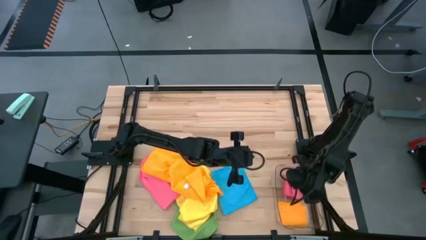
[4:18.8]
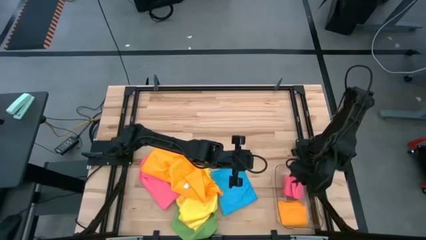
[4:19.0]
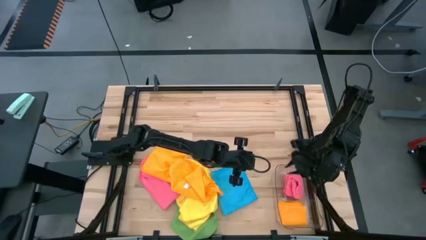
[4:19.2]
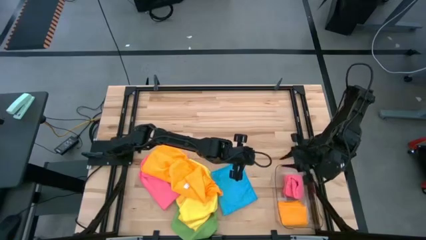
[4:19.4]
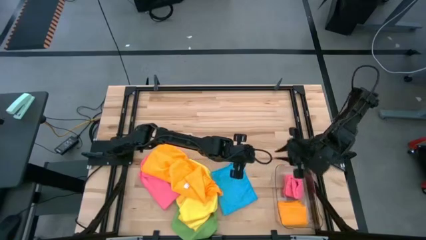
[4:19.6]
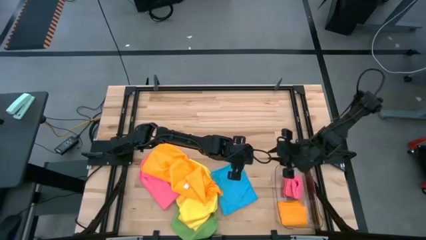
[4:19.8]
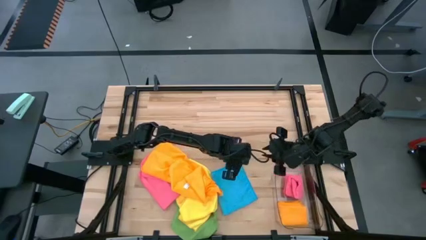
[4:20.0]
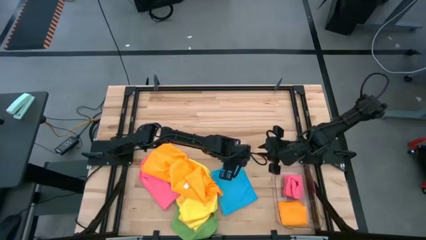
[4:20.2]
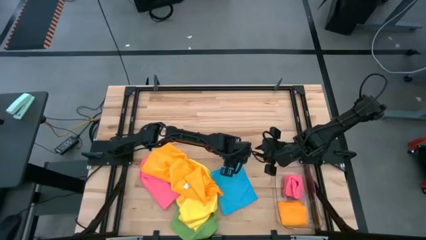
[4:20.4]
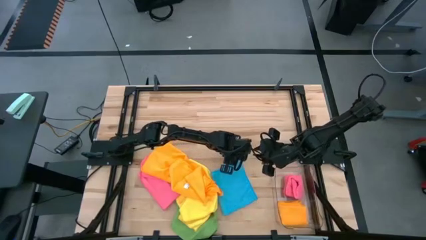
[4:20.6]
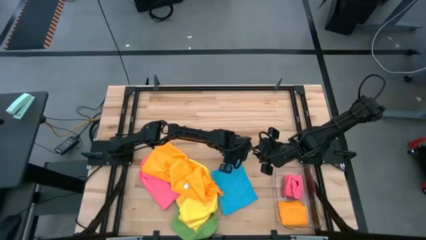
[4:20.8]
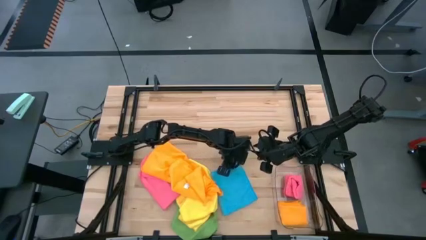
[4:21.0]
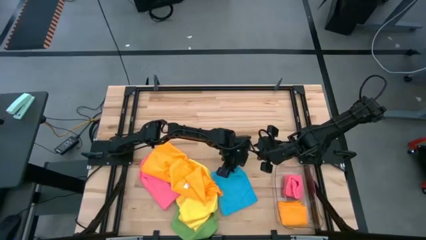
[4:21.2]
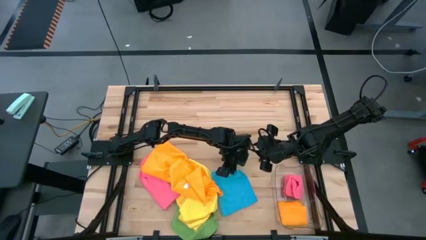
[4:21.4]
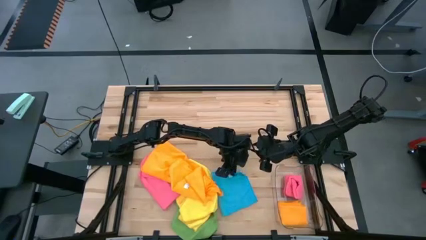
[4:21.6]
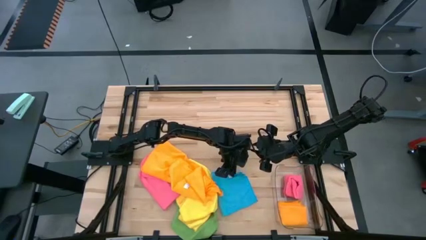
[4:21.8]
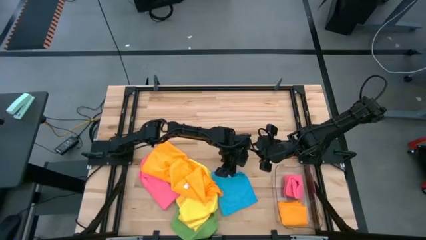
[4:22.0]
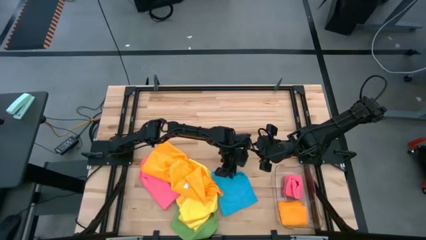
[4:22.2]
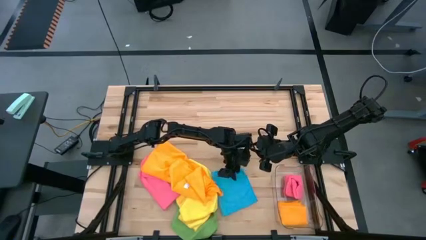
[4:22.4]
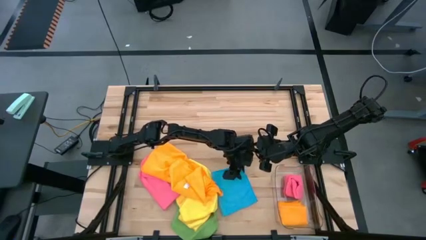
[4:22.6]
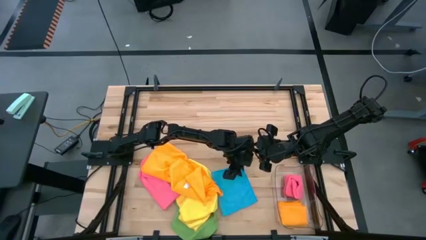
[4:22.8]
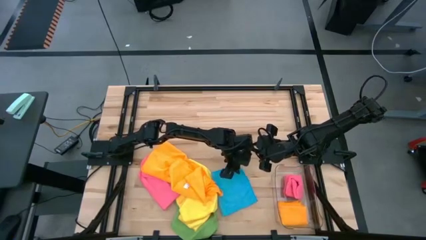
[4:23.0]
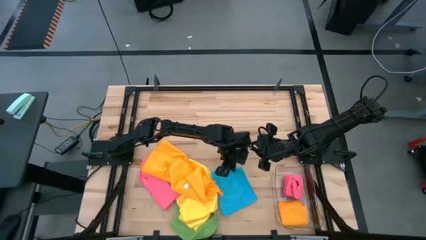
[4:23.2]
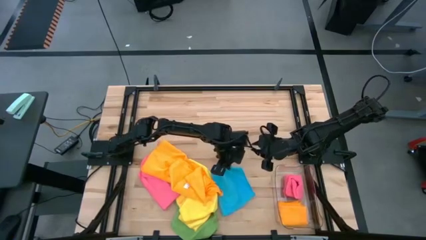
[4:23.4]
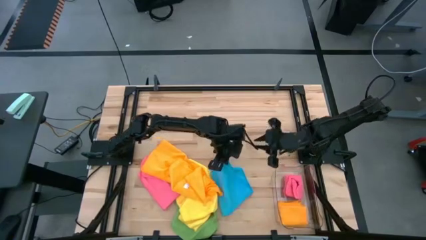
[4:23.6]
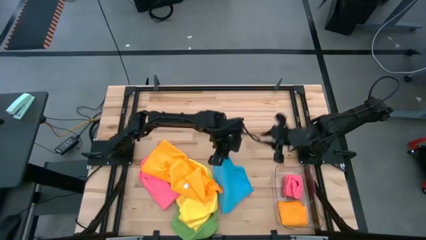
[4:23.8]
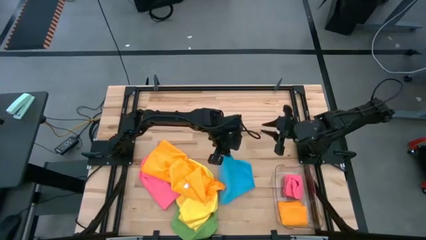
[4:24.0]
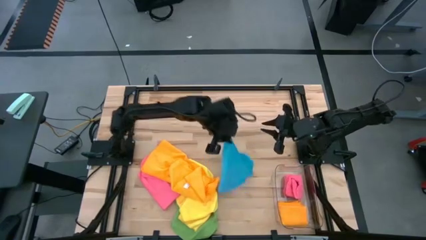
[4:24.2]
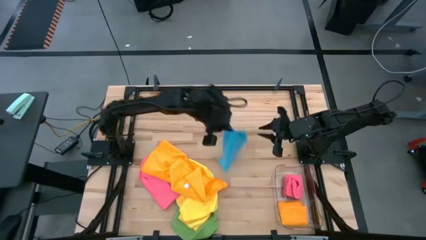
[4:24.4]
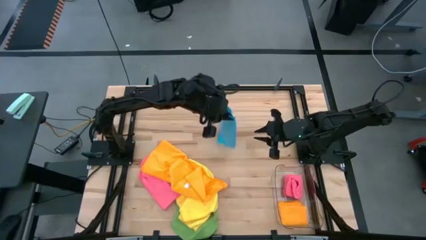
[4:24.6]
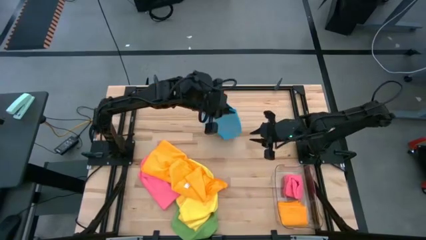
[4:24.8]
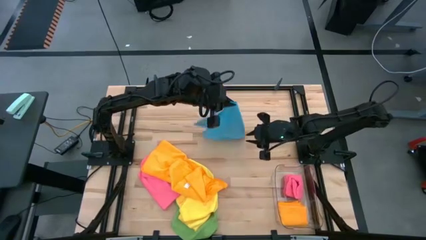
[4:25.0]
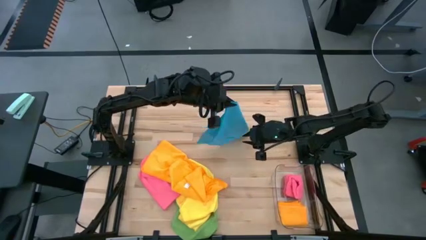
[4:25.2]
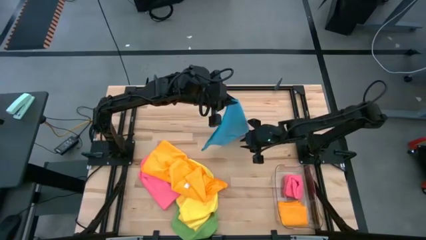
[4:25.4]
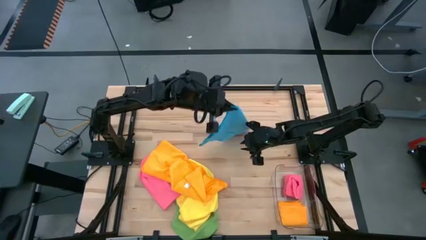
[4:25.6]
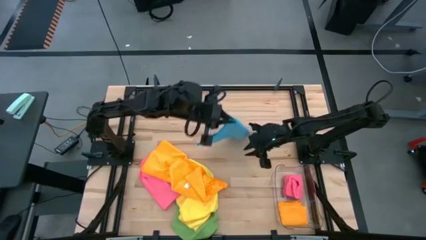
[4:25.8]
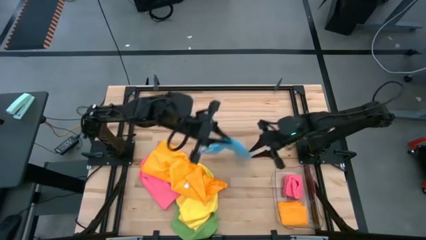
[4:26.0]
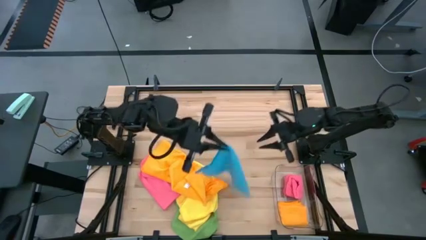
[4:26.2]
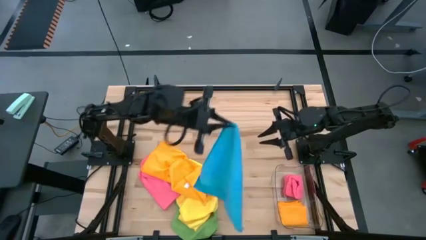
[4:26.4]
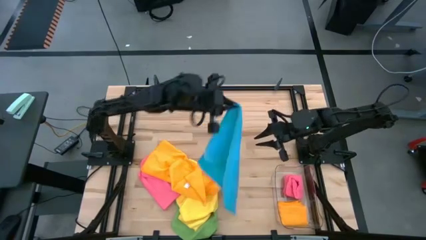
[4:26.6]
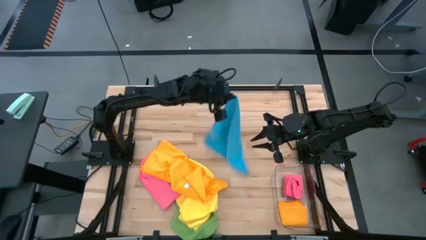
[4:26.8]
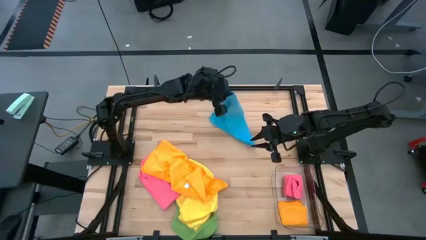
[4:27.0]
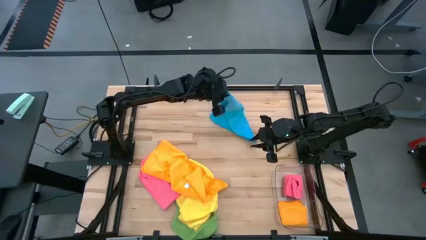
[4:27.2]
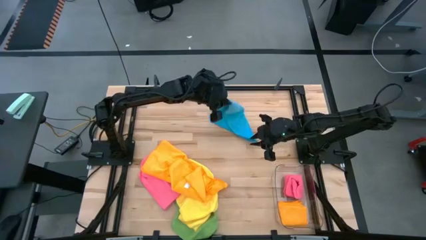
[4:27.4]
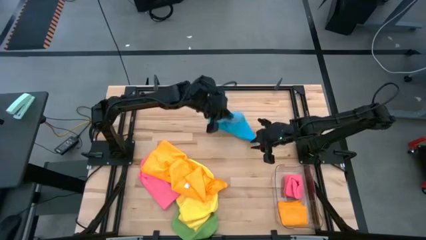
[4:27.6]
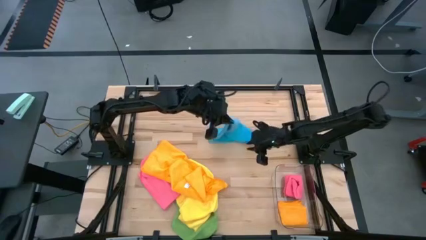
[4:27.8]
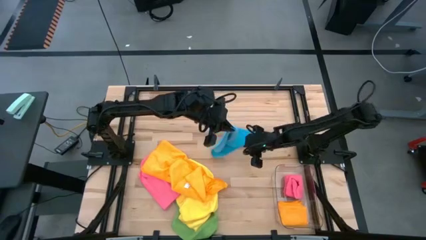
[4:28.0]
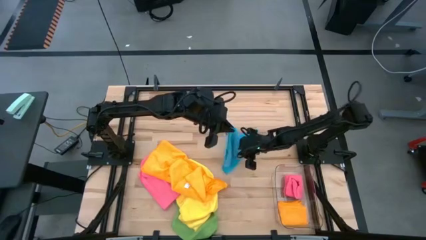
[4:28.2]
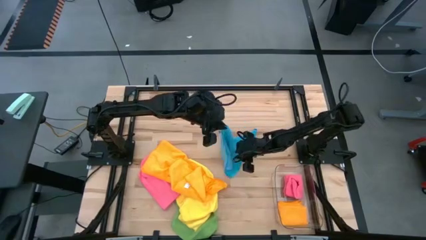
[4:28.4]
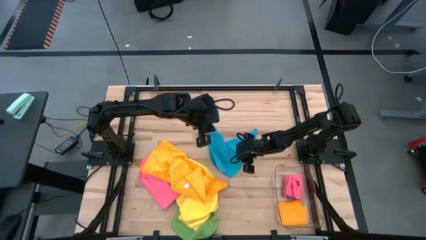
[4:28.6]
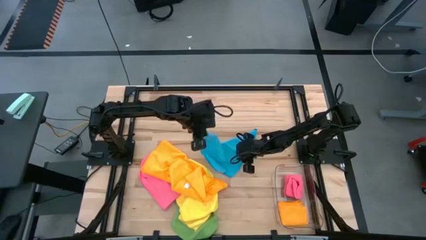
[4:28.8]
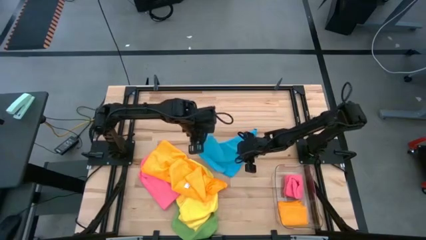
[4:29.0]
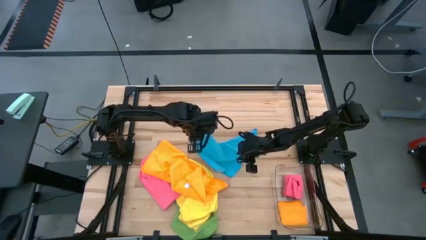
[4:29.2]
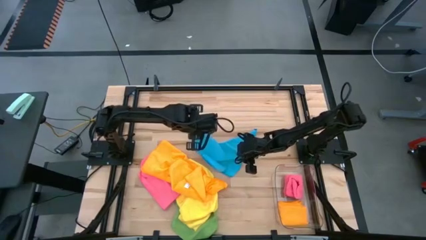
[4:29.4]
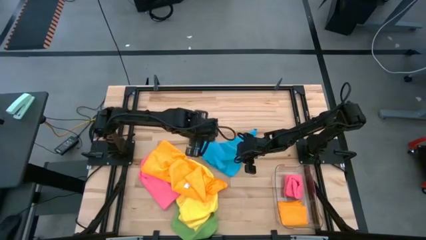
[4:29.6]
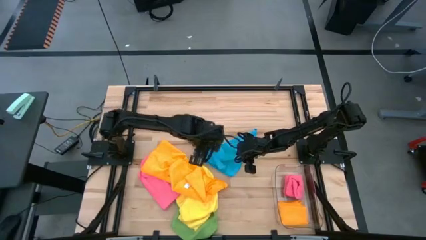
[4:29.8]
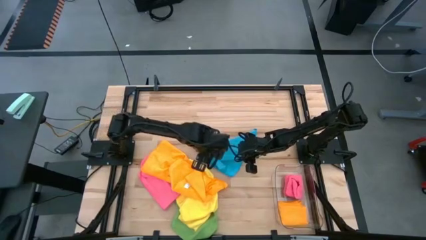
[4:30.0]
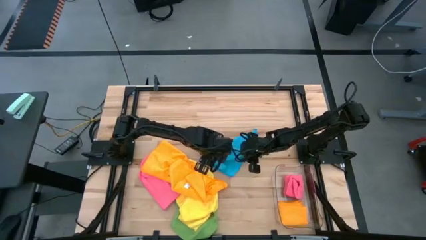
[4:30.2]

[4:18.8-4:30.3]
Task: Fold microfiber towels
Fold the blue towel

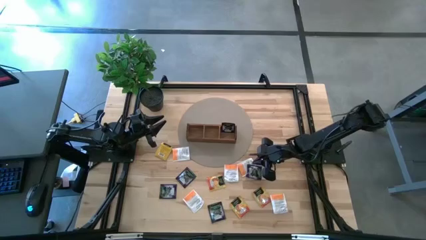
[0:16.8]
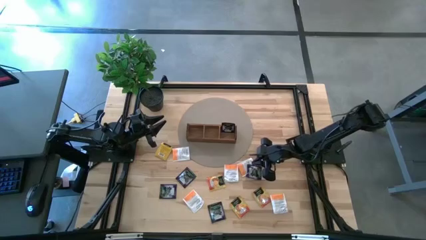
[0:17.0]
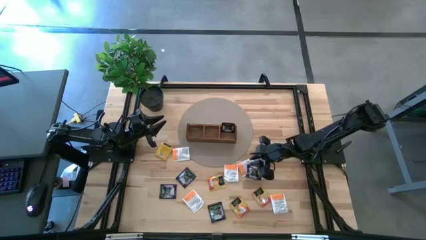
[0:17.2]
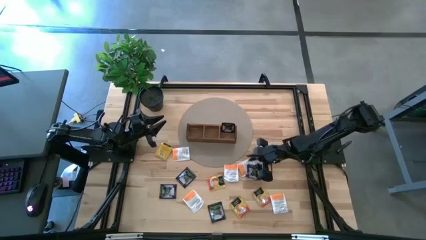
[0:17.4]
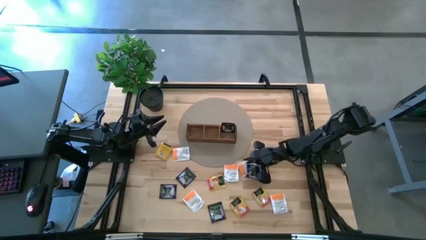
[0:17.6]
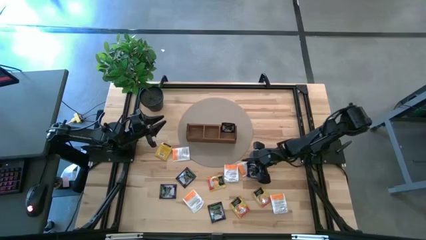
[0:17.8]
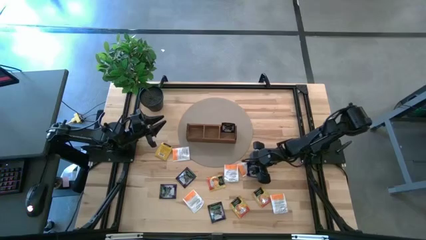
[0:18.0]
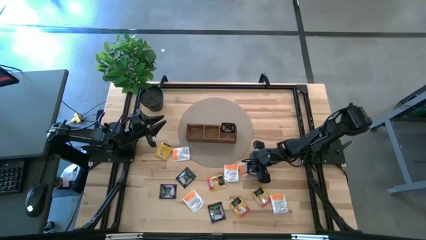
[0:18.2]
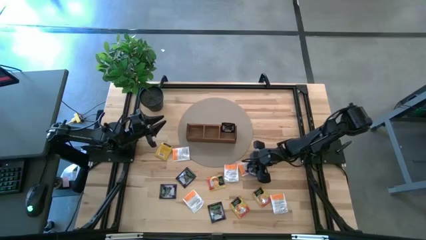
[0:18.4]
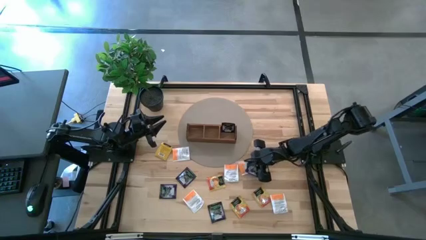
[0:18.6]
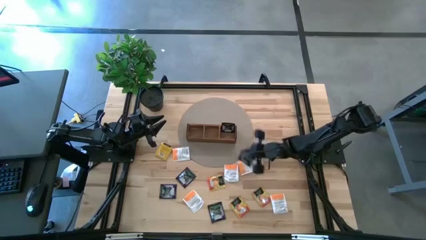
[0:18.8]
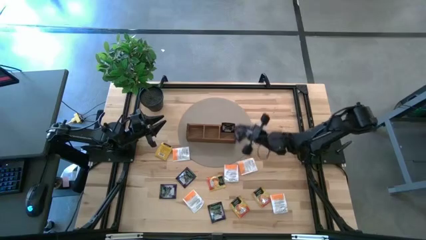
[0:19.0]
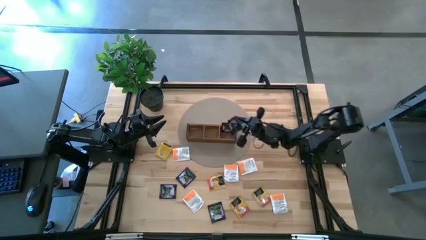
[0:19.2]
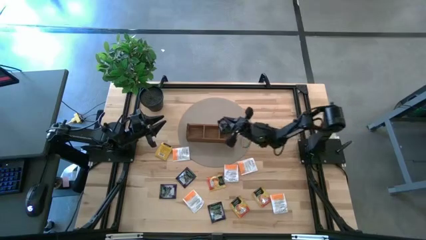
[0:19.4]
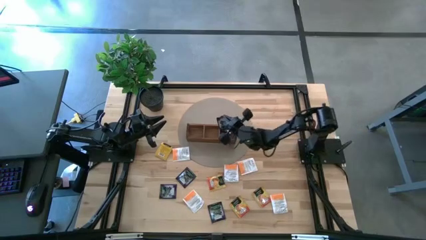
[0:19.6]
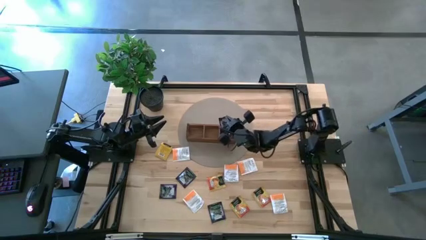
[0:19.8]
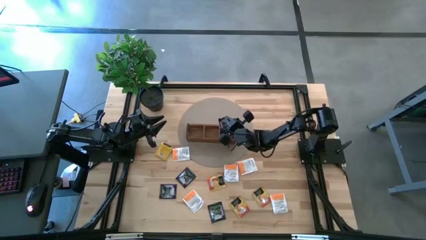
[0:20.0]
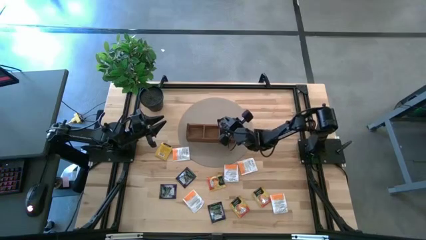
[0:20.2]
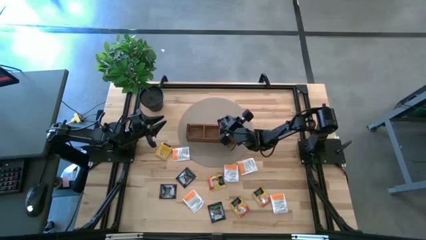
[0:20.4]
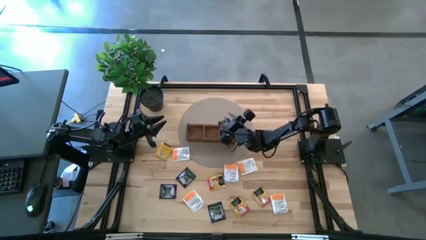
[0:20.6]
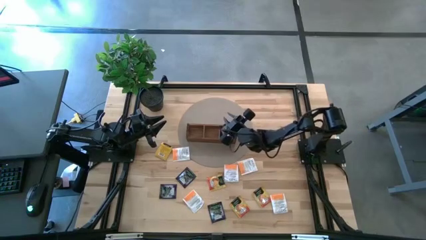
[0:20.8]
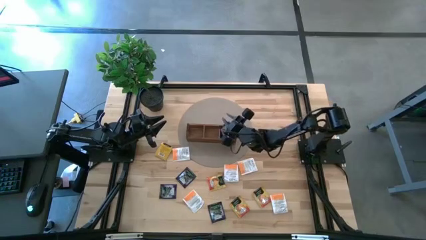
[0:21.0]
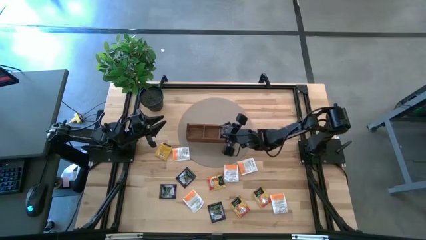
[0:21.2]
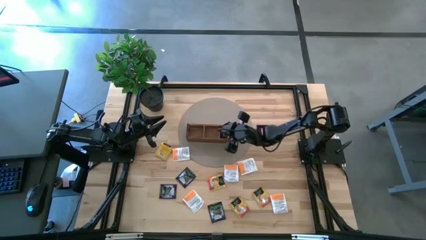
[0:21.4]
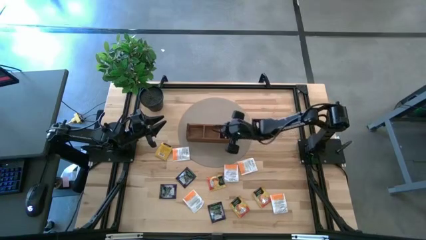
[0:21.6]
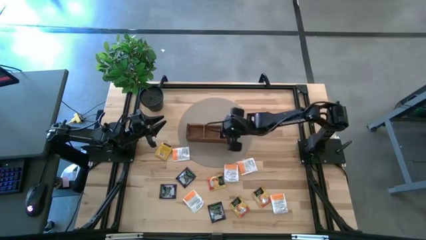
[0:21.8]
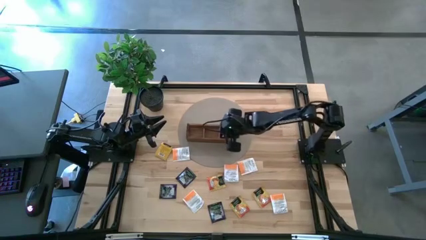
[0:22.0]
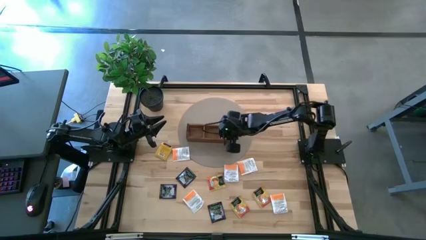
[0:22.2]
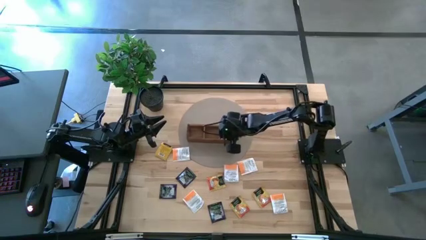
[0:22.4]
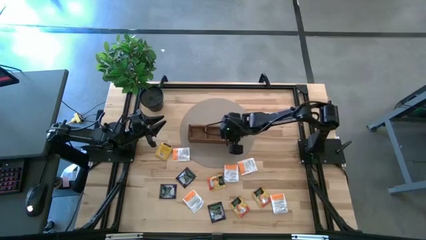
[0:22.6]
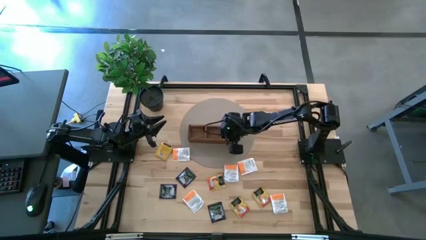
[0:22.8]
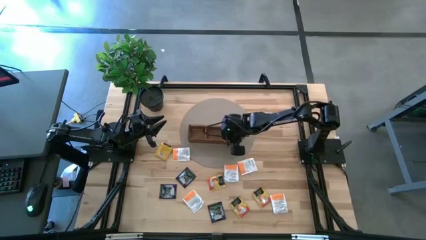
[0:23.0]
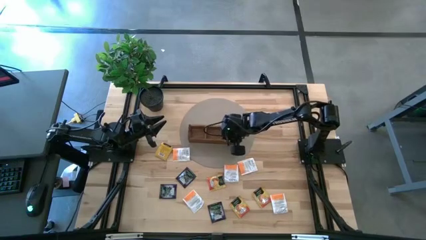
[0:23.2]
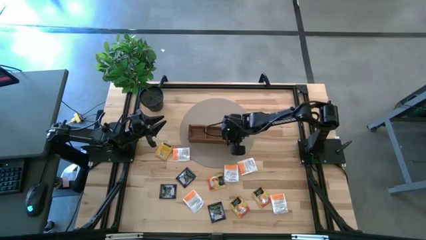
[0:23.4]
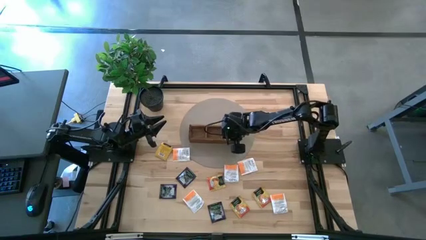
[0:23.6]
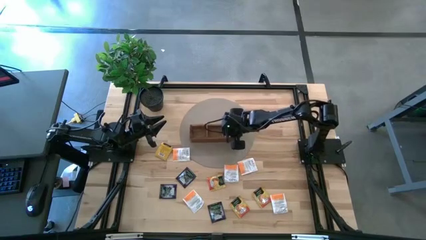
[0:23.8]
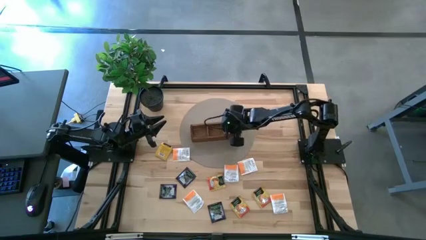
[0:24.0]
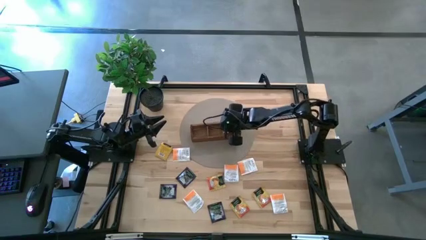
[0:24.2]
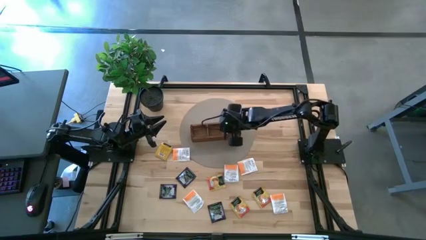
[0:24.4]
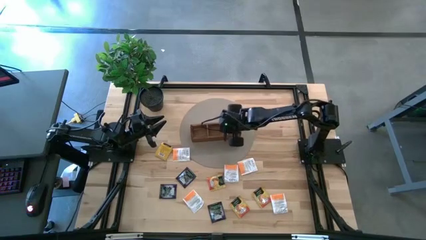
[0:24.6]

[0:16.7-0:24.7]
Task: Pick & Place Tea
Put the purple tea bag into the right section of the wooden organizer
